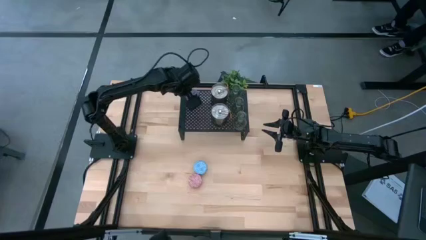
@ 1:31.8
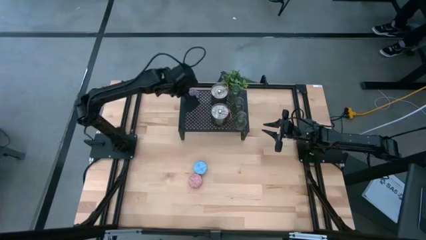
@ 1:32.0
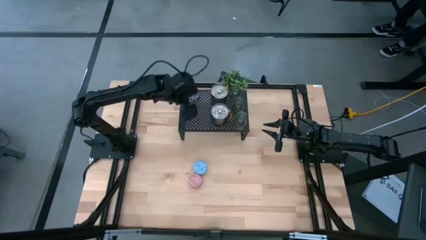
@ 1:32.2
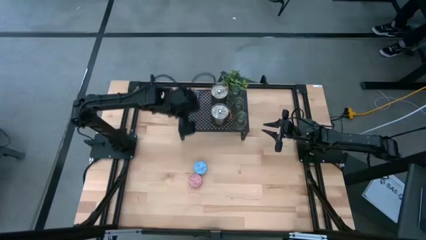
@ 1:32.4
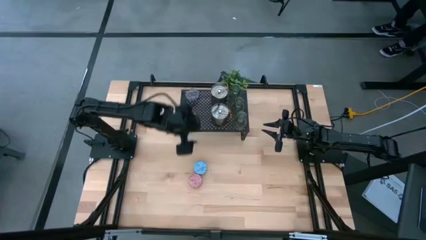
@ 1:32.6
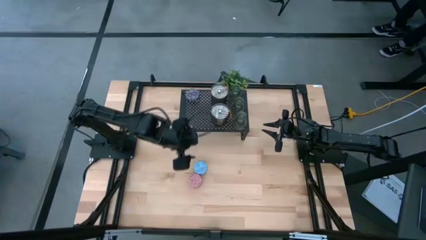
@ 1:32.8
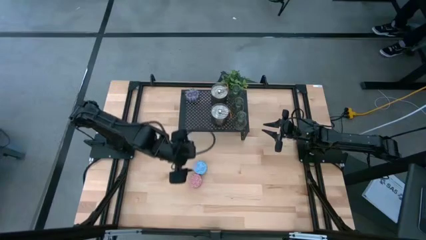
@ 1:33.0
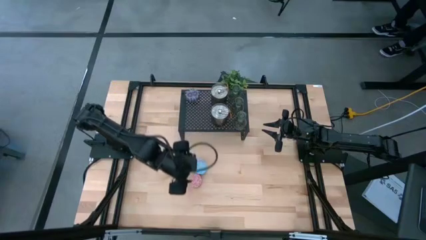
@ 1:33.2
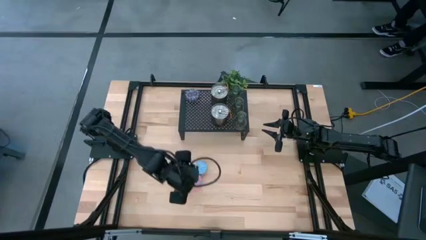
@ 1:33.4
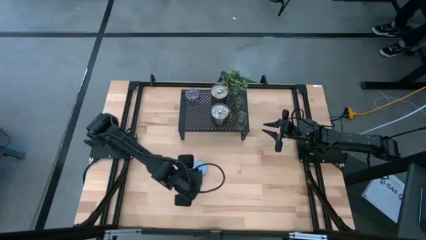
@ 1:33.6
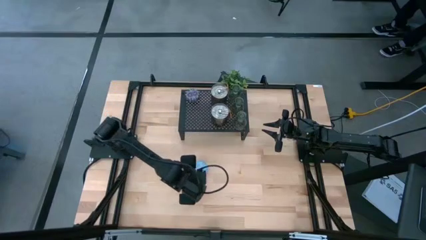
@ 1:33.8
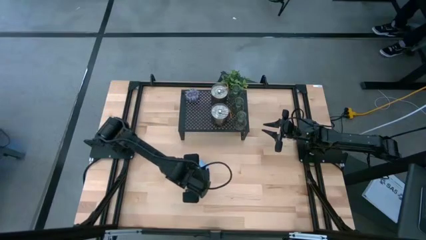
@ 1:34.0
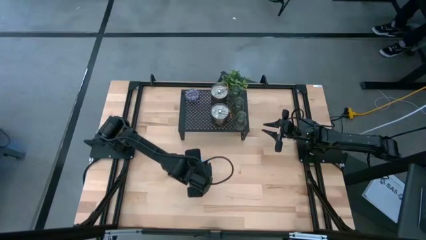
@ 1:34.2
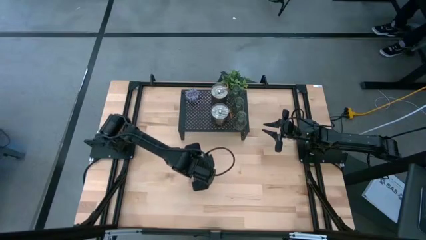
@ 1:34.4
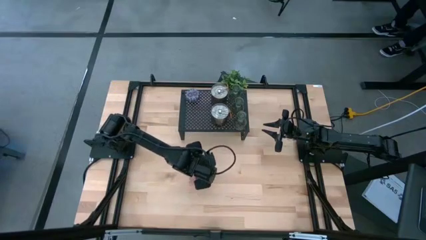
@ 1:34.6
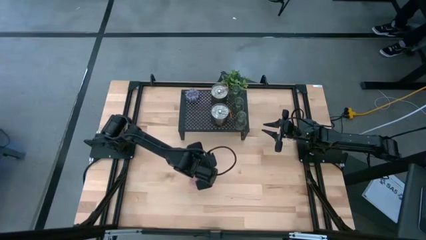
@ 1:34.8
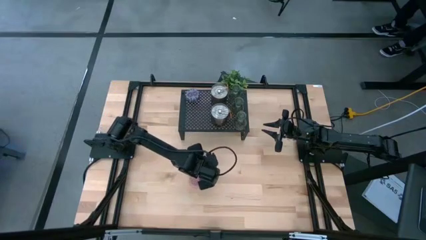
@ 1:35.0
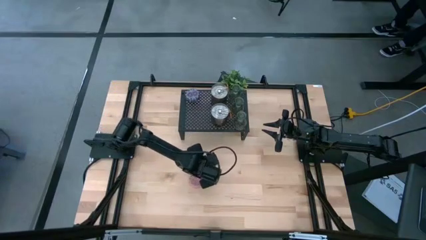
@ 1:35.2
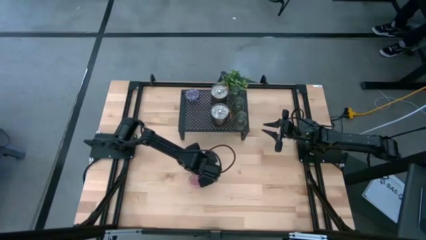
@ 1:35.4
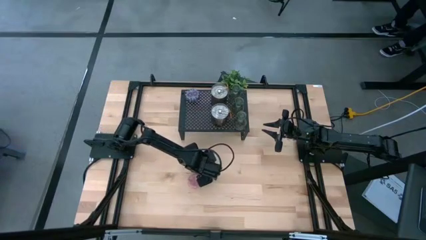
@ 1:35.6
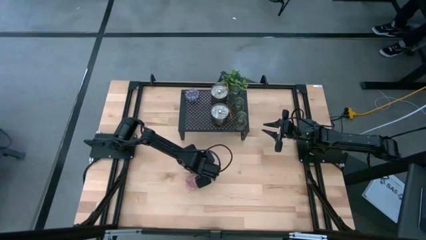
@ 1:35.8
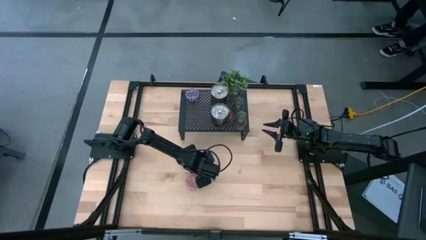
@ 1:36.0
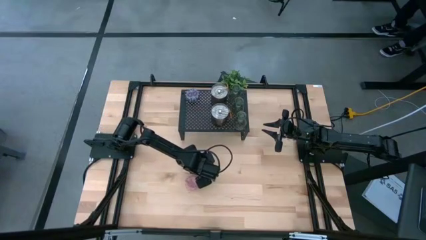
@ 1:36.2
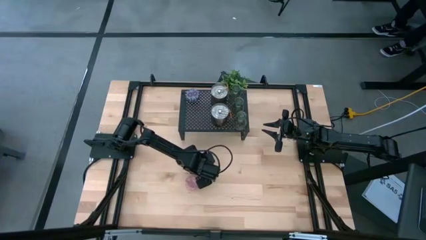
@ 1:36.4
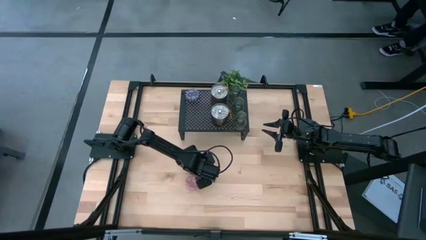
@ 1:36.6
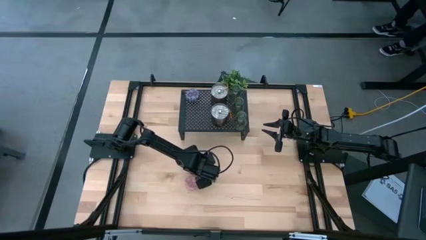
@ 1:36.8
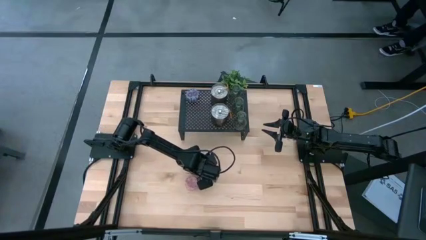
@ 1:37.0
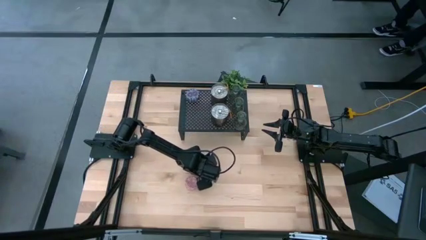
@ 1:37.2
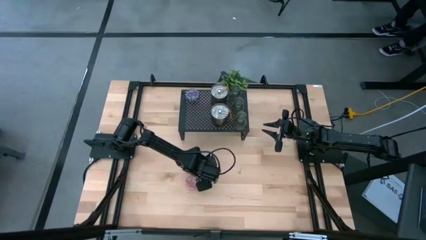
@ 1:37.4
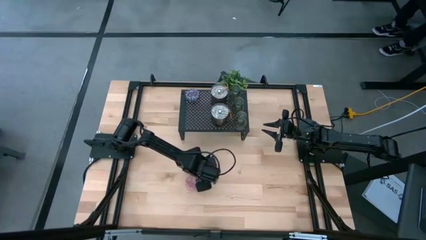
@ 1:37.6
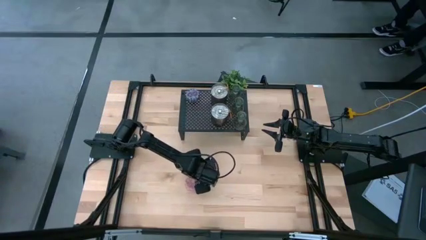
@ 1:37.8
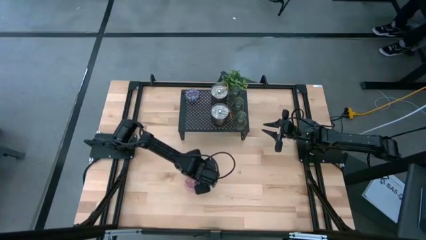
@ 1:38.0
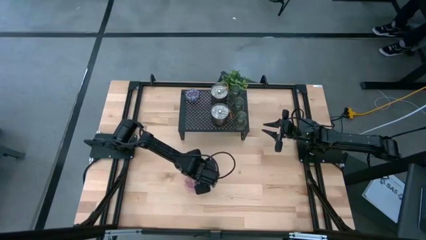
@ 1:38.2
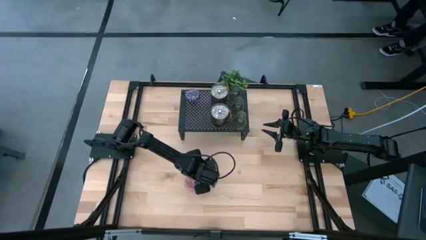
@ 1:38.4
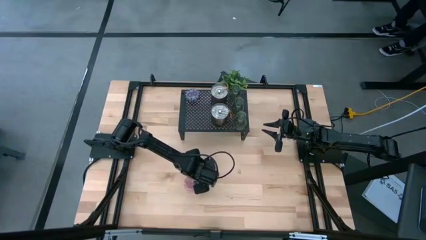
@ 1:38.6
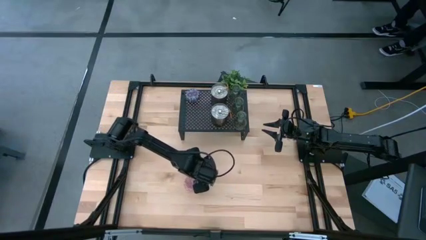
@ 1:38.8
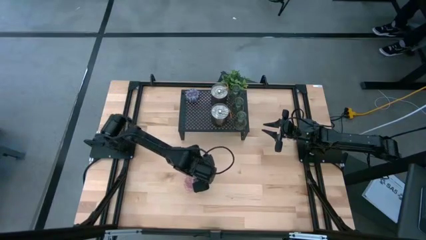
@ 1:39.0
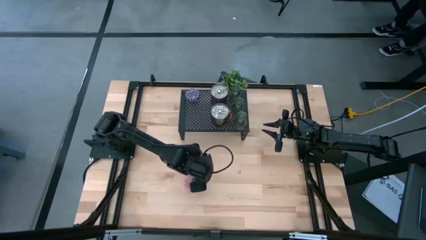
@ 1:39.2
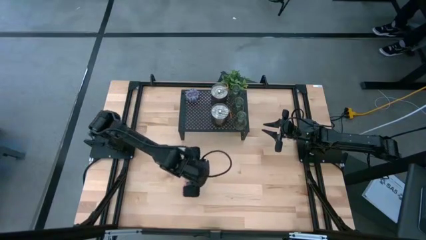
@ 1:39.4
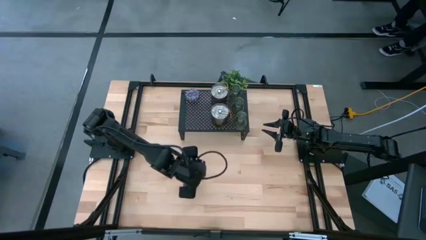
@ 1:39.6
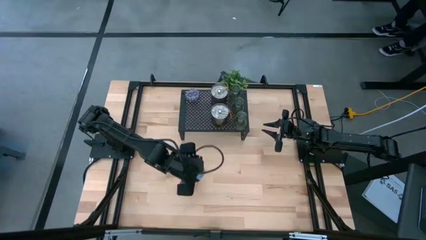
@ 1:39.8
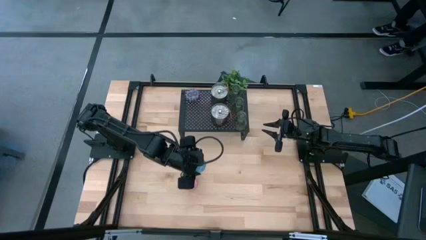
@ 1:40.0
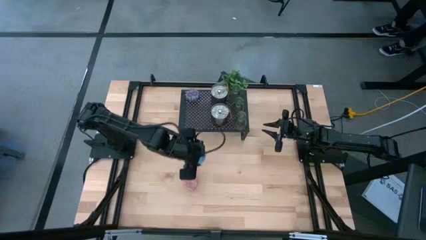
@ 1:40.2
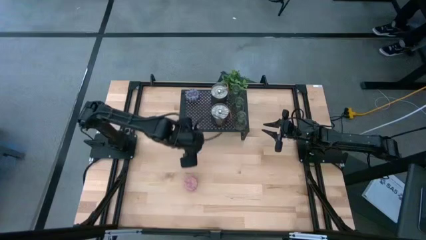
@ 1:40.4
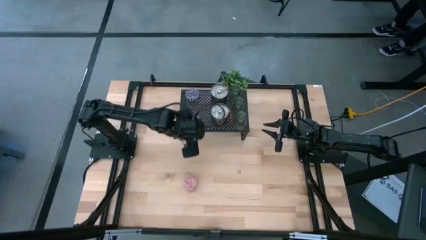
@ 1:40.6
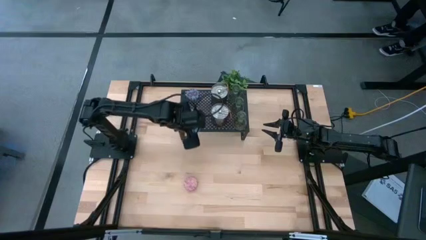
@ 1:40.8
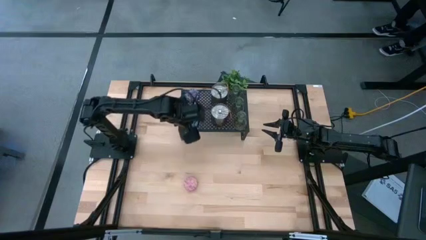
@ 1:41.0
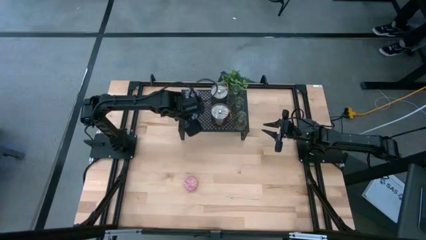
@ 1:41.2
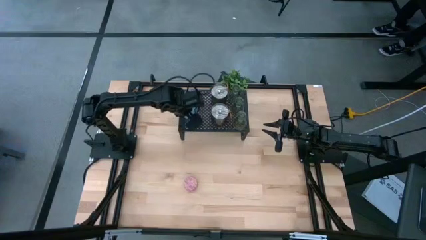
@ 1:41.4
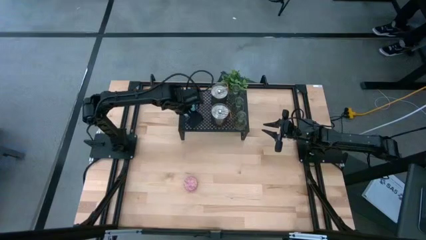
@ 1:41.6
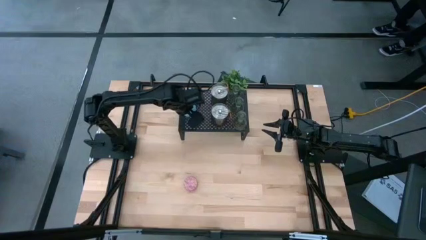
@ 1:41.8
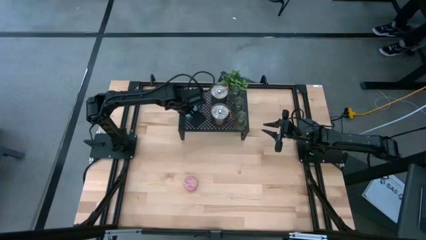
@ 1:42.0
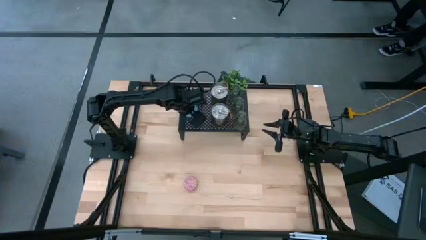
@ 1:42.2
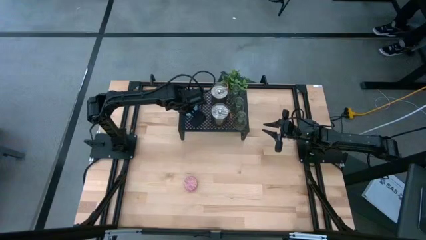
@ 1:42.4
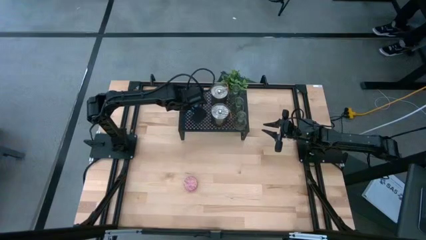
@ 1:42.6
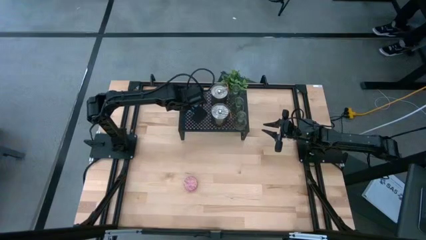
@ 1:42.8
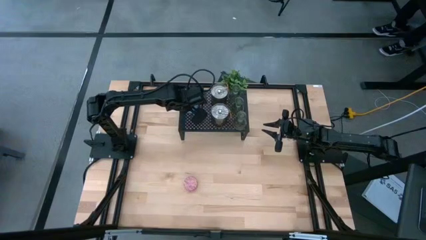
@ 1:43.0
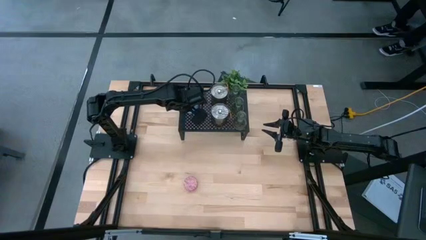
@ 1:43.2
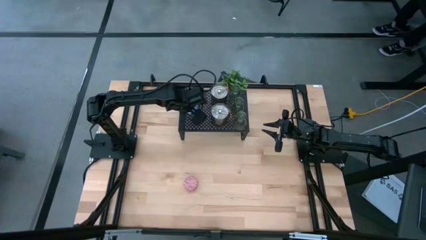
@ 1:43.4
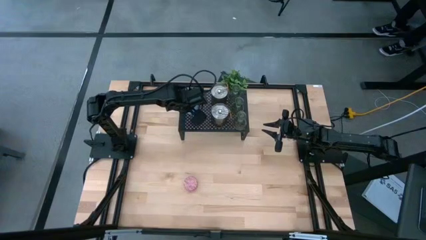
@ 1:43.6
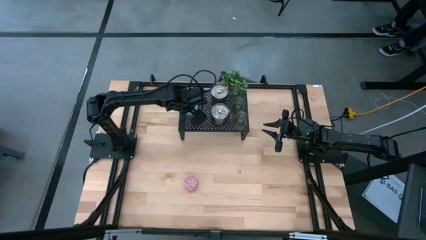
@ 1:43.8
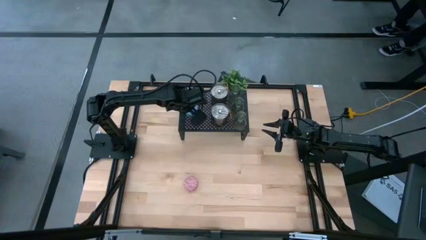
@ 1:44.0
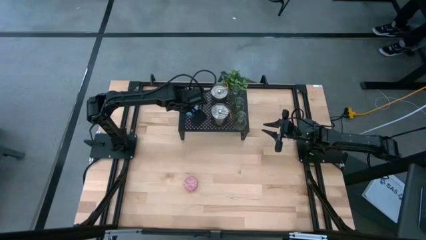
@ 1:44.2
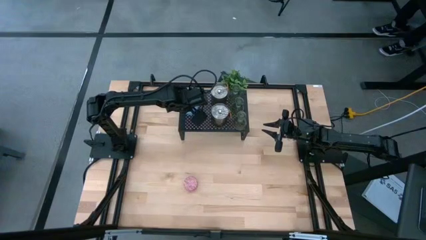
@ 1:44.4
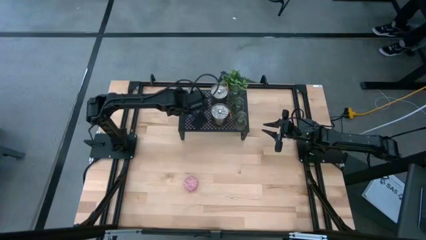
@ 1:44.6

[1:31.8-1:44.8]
Task: Pick & Place candle stick holders
Put the blue patterned scented candle aligned with the red patterned scented candle on the shelf
